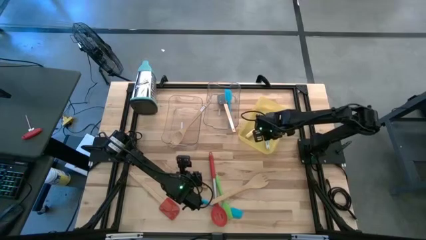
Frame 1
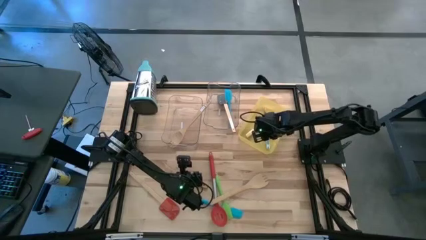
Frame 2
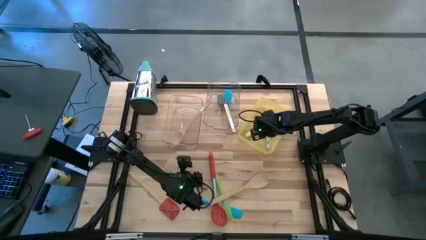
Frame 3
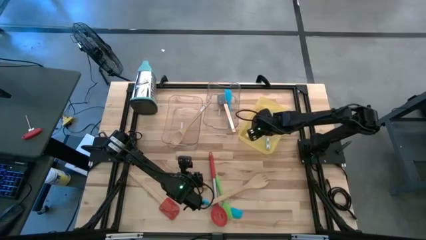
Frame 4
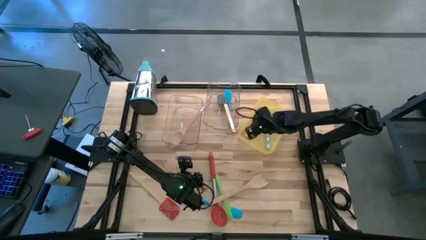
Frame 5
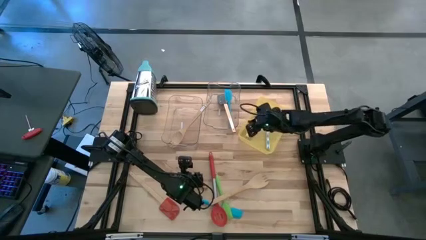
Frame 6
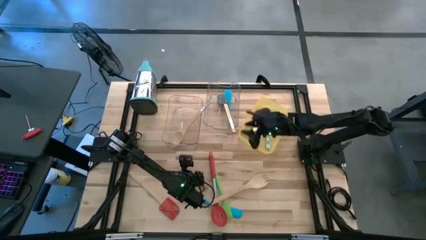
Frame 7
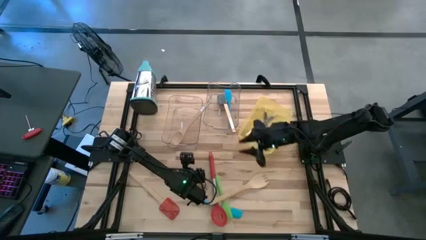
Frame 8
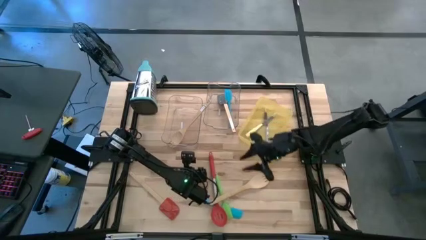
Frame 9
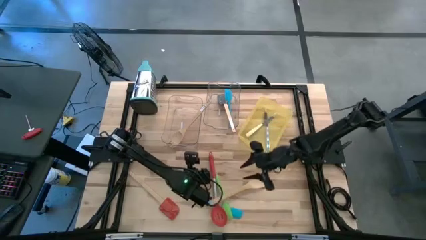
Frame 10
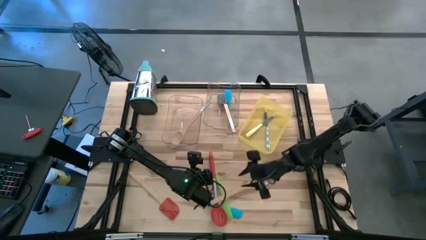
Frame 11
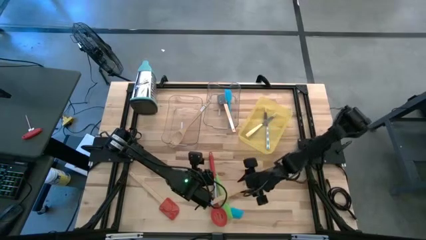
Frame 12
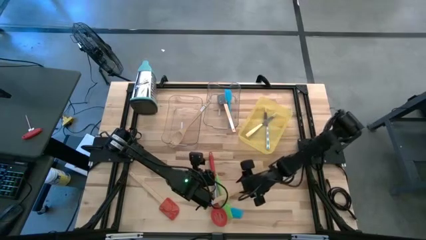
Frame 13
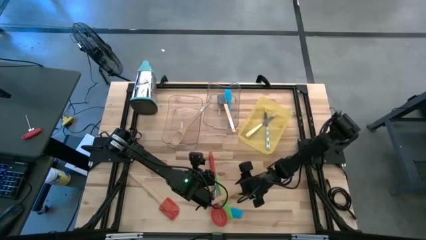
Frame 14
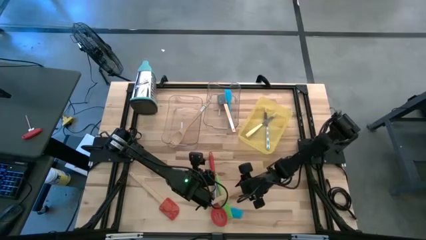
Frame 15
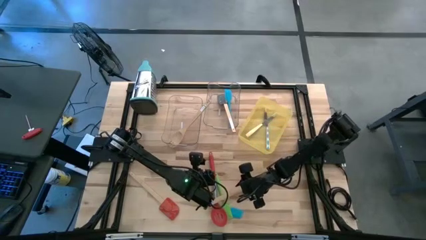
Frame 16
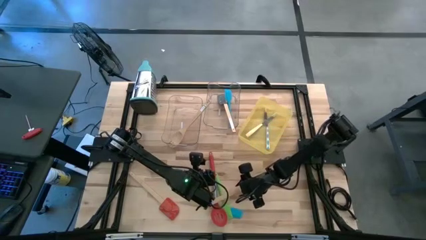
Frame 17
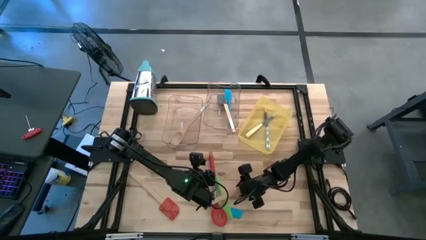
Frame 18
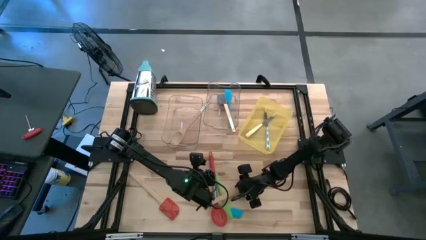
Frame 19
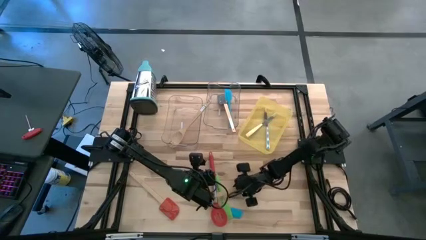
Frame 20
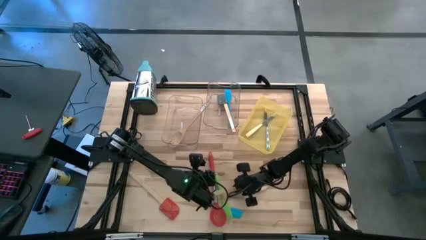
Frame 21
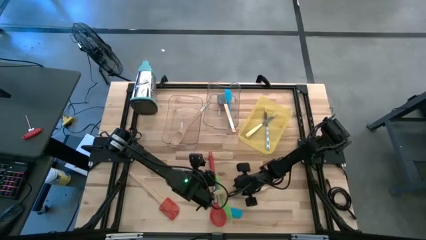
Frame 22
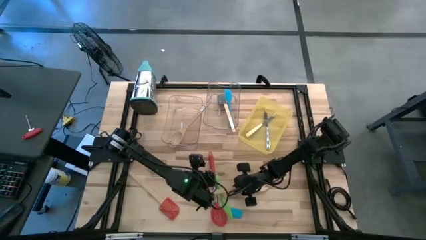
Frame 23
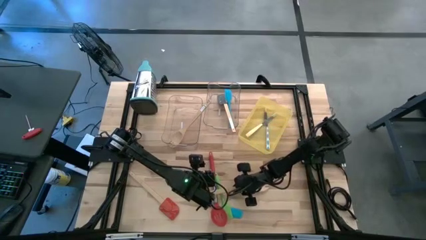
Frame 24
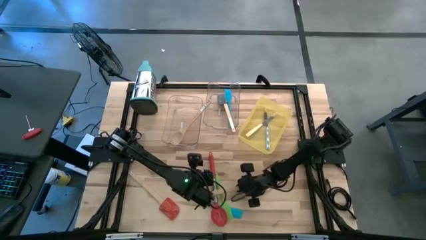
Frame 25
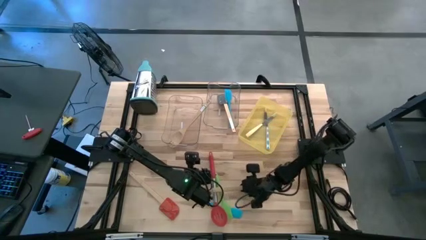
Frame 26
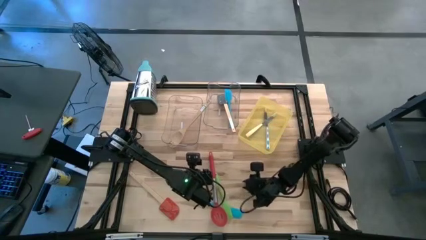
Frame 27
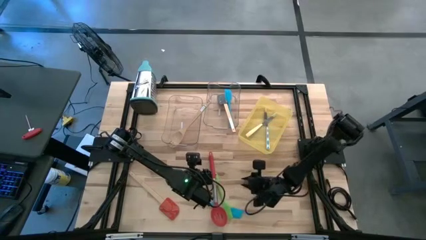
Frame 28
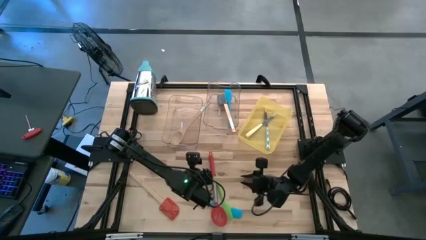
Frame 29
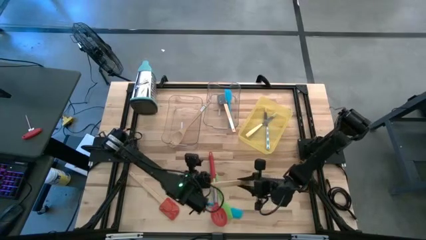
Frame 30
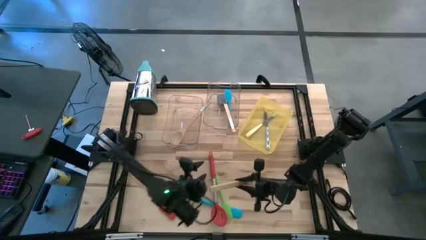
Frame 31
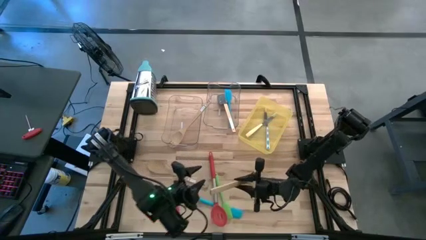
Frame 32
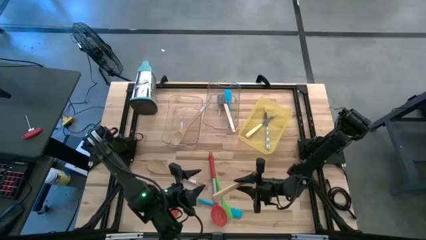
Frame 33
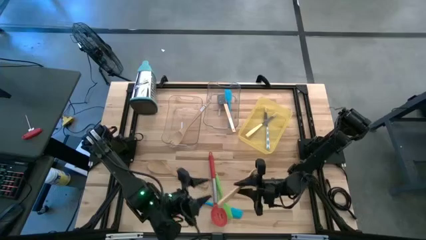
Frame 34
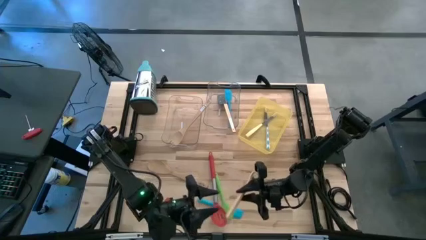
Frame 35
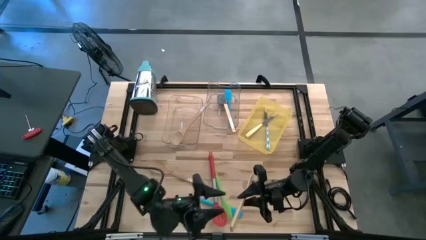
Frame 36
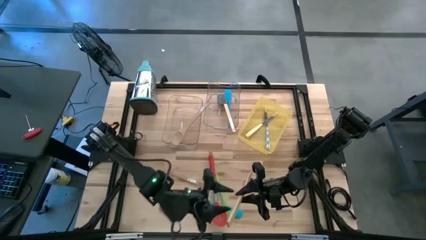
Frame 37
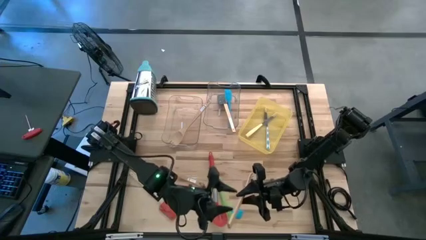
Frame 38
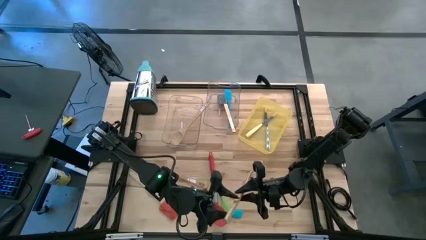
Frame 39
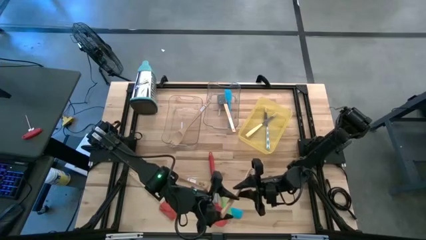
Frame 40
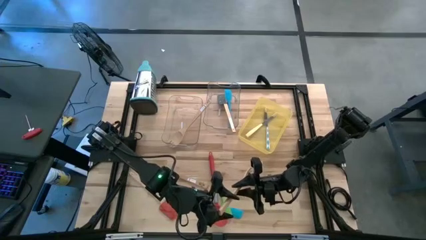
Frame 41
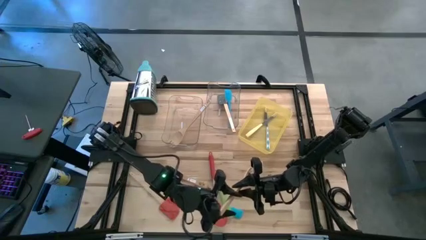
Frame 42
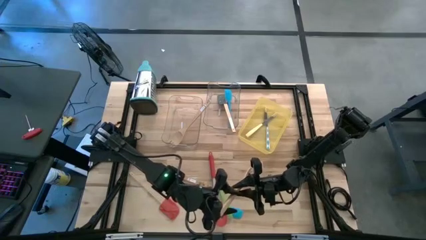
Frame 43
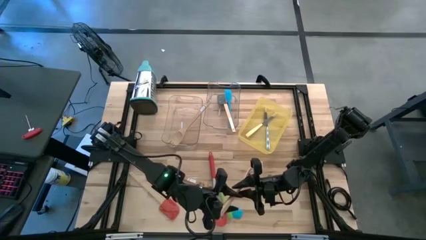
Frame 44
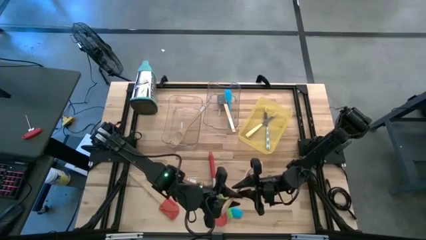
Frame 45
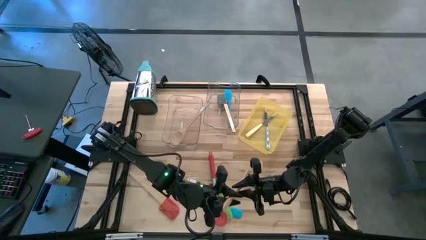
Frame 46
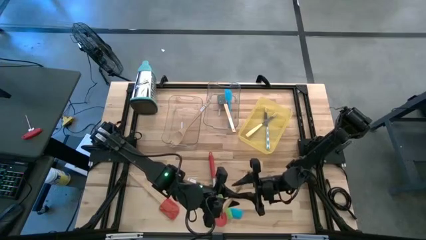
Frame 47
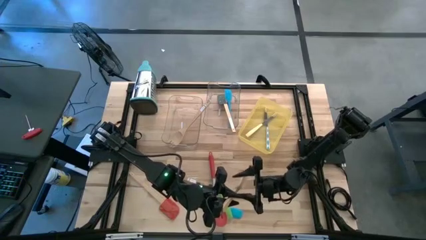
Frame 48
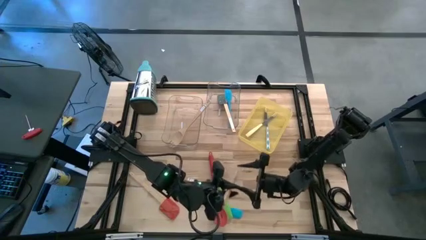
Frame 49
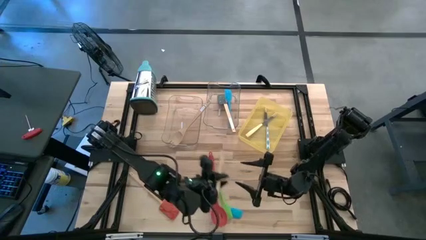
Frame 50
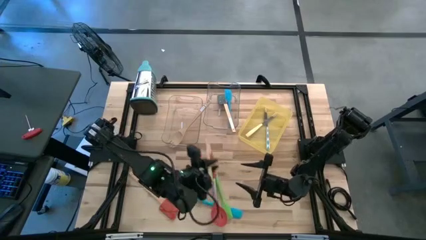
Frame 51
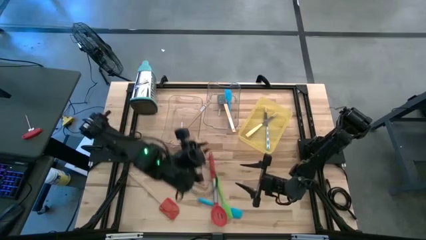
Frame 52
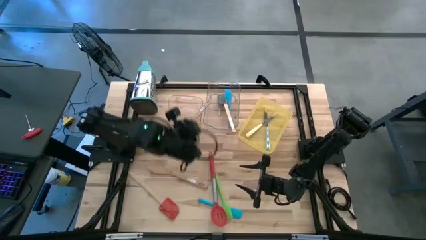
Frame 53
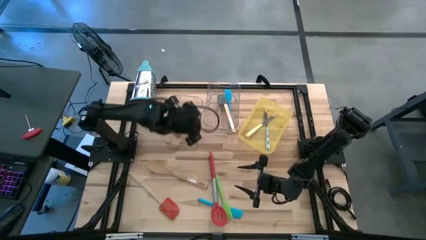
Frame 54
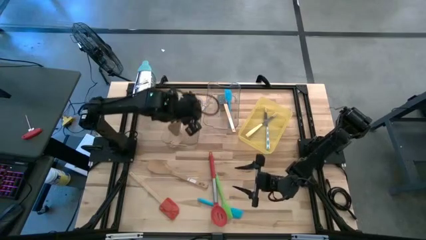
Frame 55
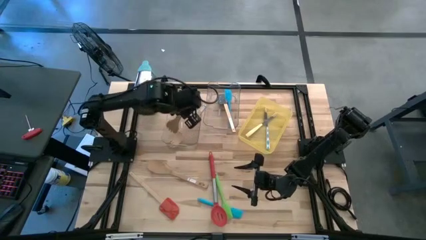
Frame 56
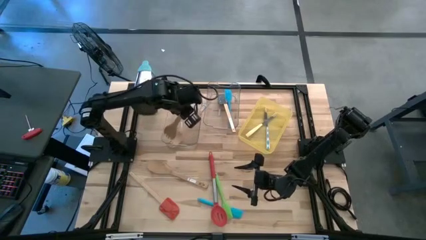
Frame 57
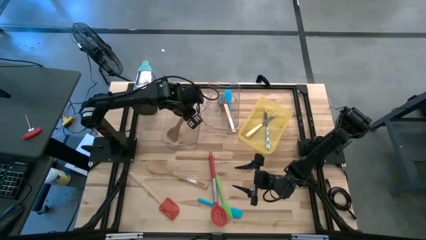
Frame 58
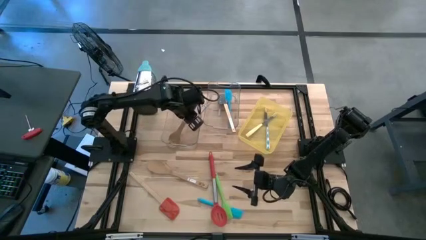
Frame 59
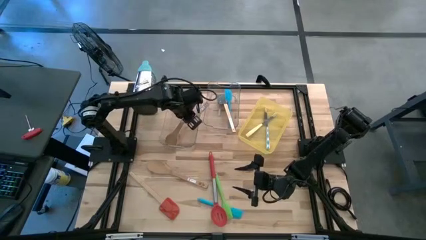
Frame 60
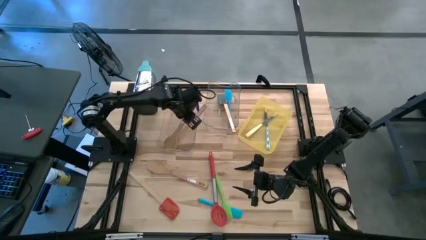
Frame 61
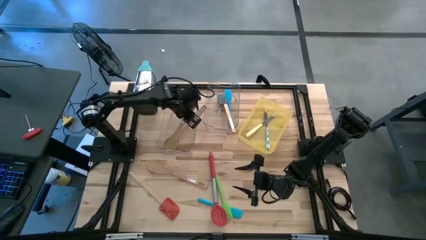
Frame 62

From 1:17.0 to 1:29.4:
Task: Pick & Place Kitchen Items
Put the wooden spork into the left transparent bin

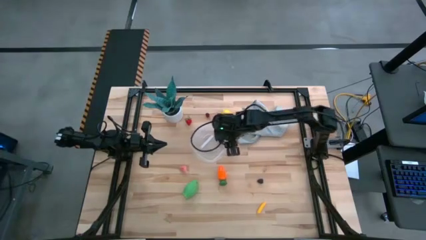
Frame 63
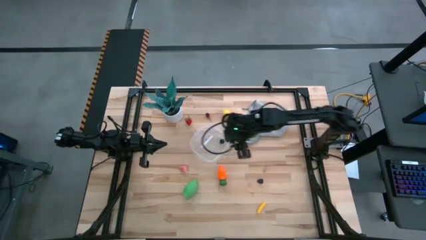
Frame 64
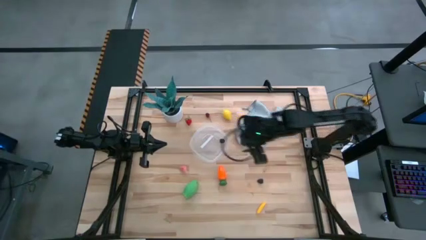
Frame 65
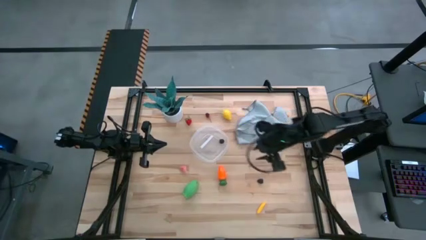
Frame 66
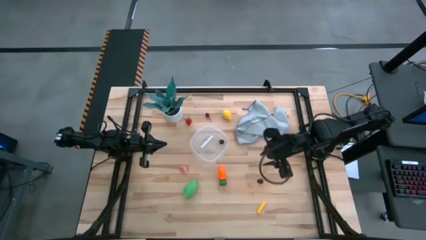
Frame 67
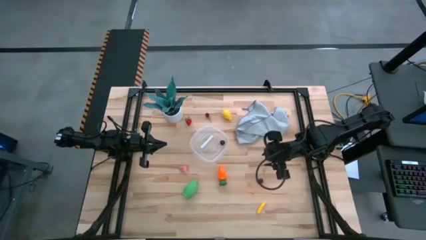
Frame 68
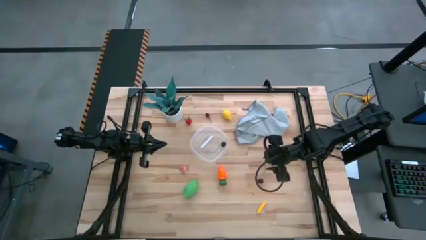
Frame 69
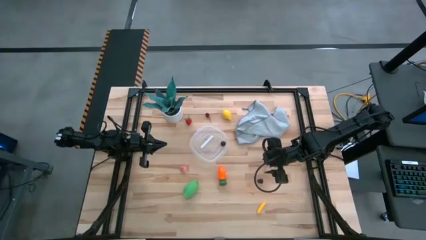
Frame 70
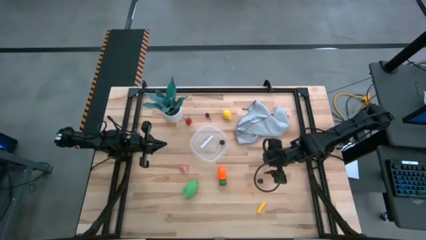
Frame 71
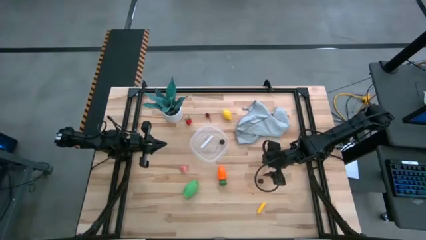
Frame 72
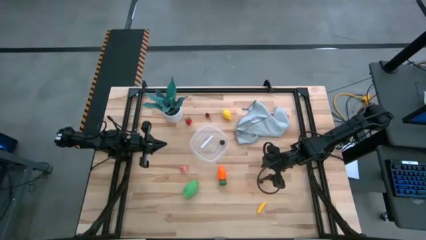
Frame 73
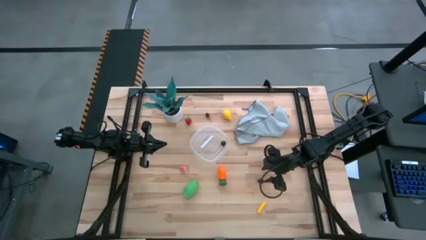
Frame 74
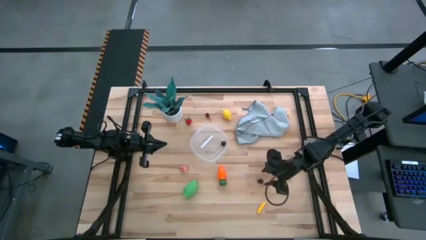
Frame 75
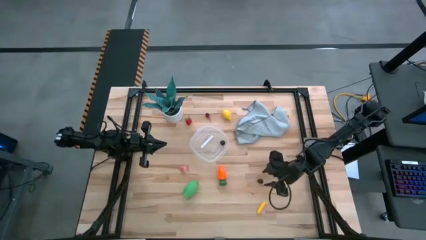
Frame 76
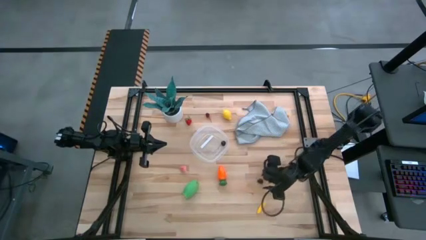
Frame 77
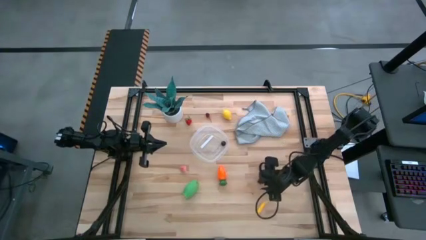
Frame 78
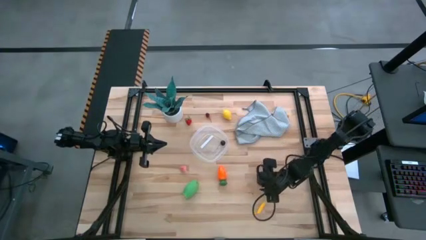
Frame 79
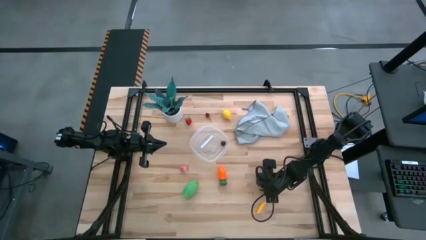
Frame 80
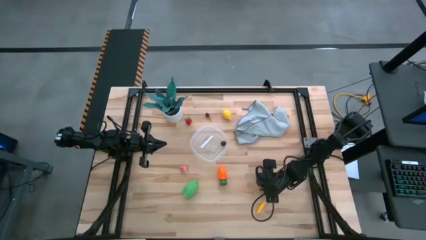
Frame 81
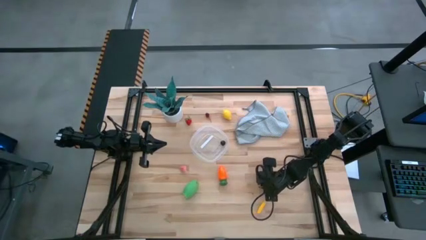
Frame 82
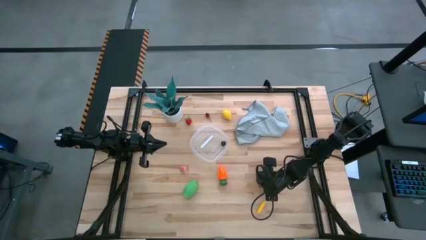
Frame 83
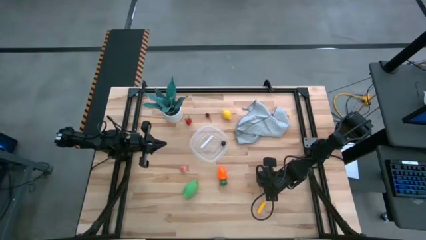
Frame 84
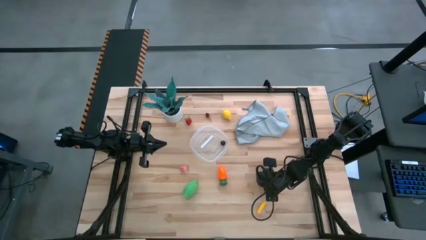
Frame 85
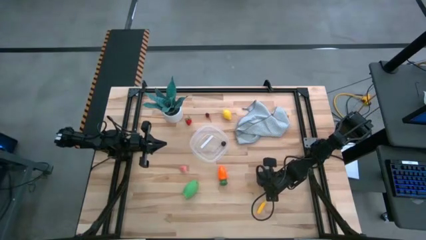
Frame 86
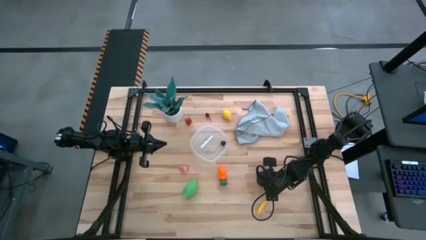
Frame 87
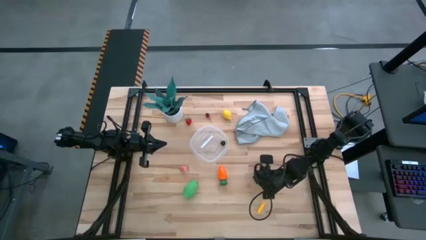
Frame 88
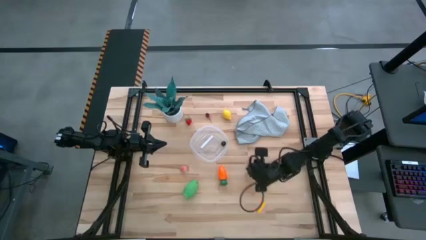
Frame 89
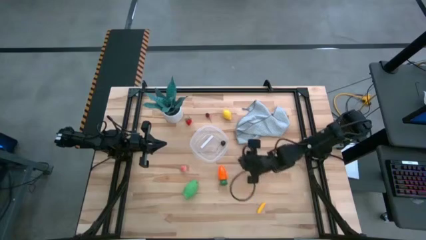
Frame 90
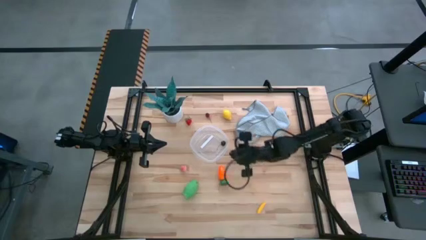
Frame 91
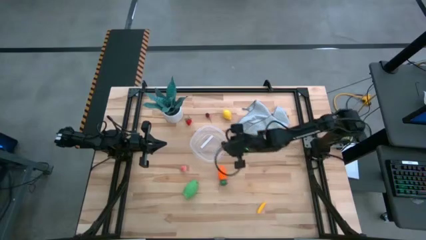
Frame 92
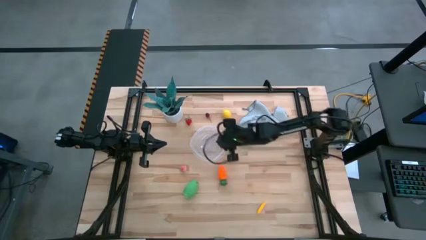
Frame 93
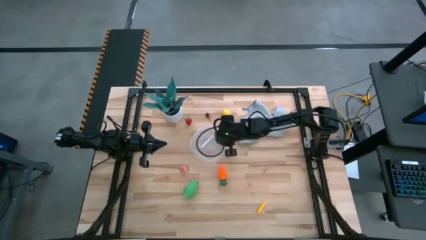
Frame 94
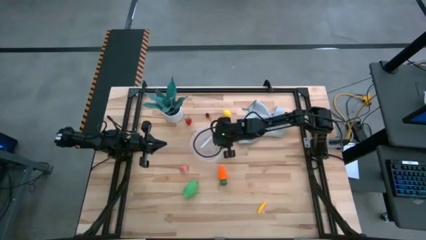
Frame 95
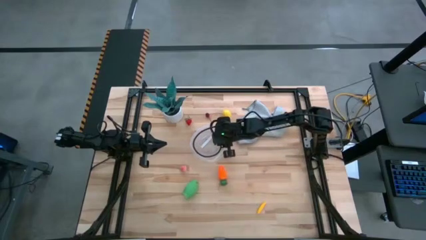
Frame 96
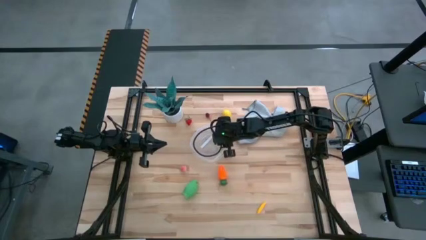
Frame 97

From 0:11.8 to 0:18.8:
Task: Pick and placing Produce into tupperware
Put the blackberry into the transparent bin
